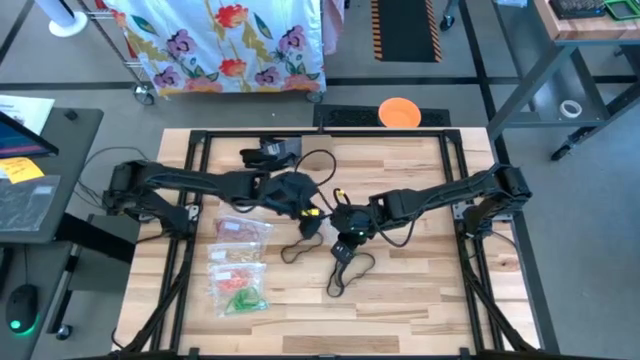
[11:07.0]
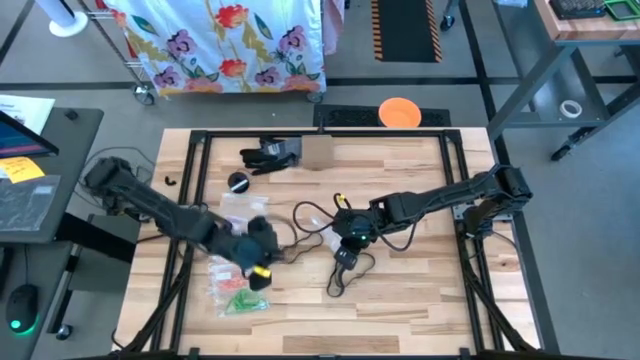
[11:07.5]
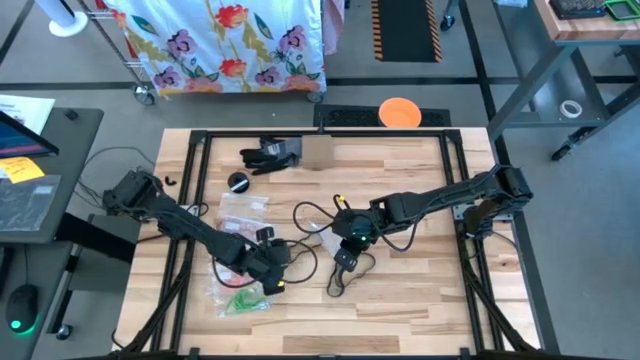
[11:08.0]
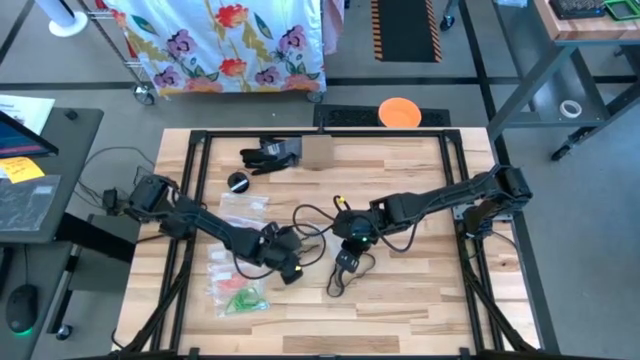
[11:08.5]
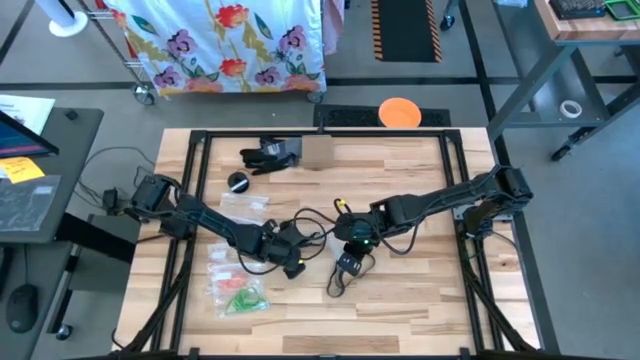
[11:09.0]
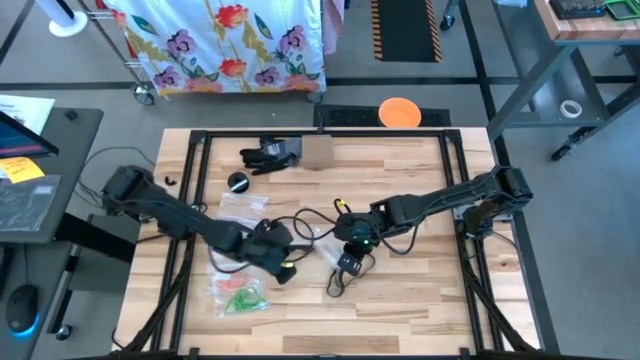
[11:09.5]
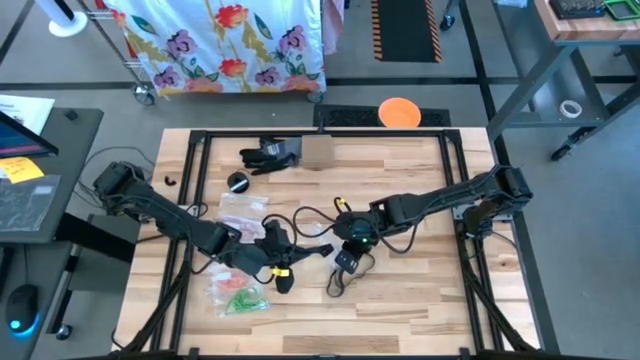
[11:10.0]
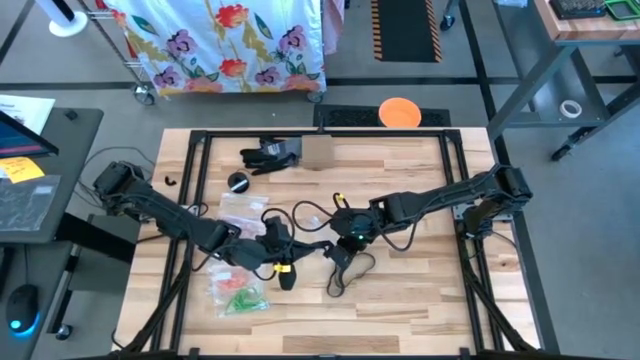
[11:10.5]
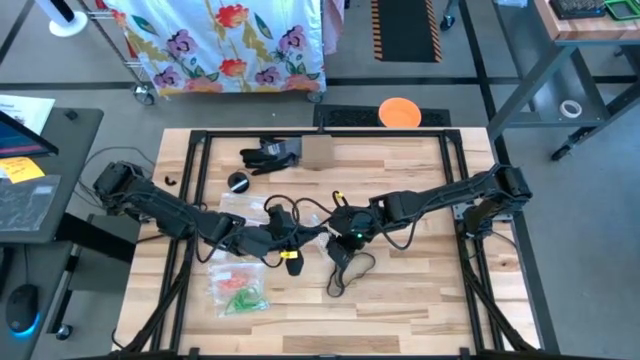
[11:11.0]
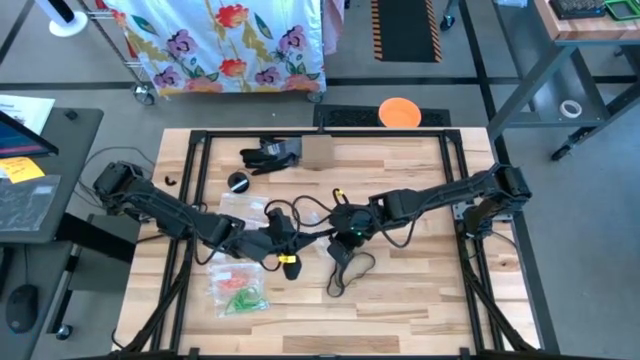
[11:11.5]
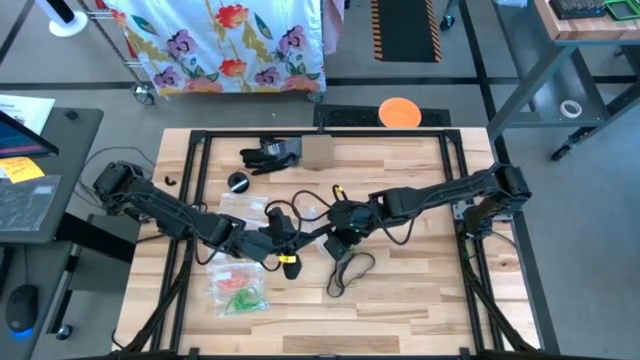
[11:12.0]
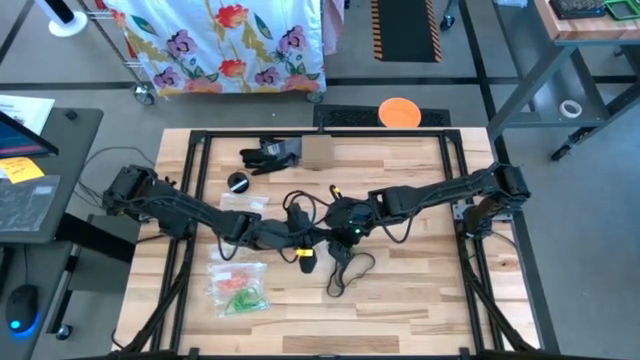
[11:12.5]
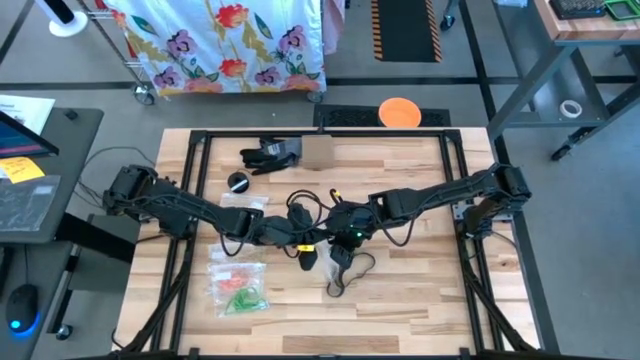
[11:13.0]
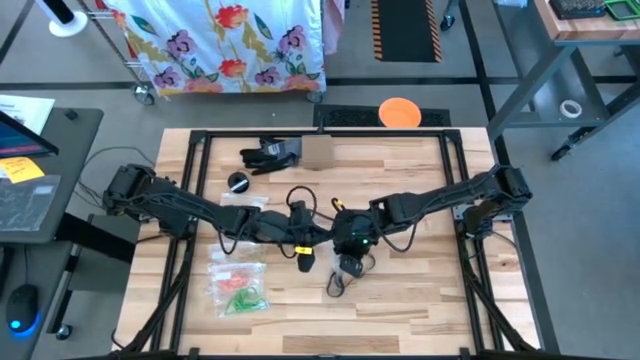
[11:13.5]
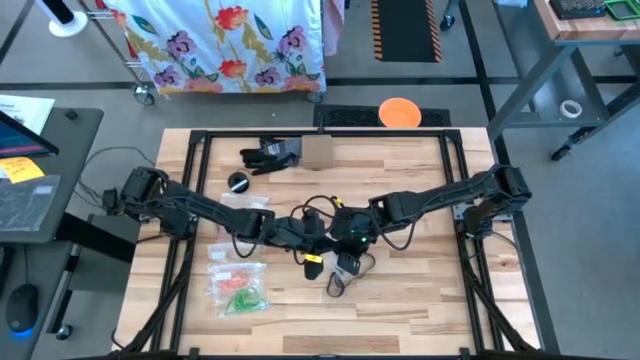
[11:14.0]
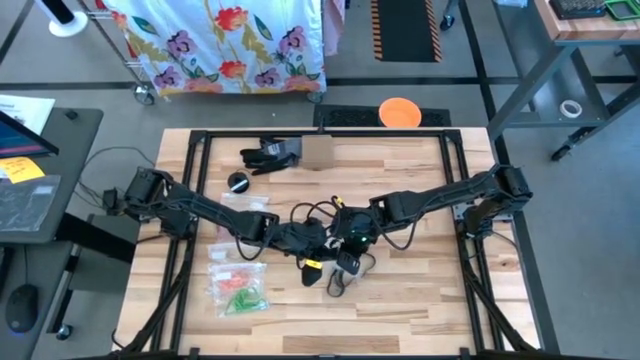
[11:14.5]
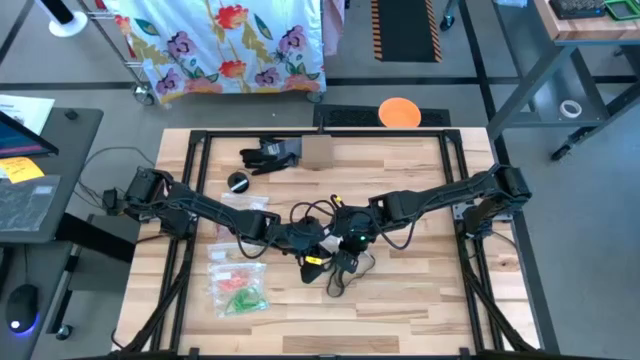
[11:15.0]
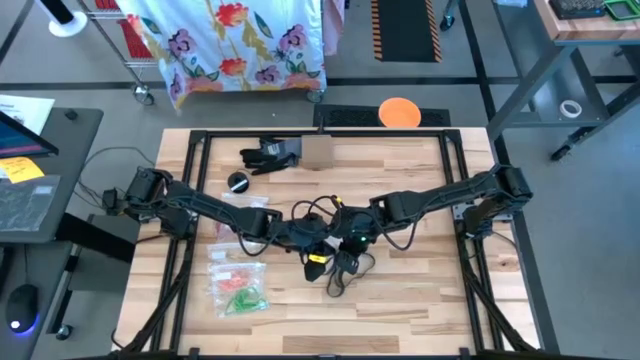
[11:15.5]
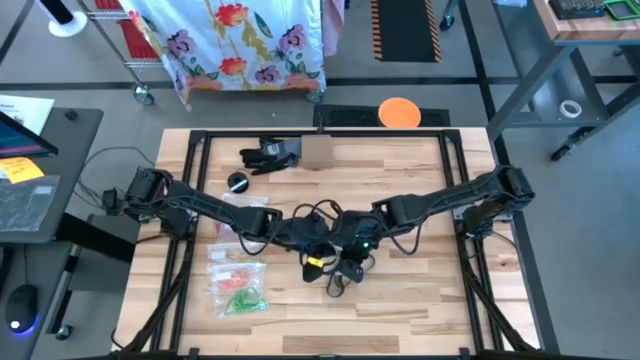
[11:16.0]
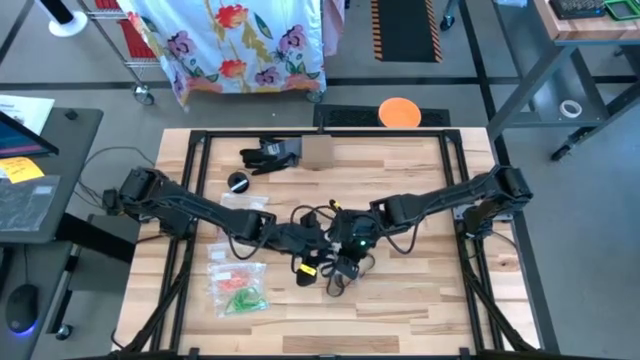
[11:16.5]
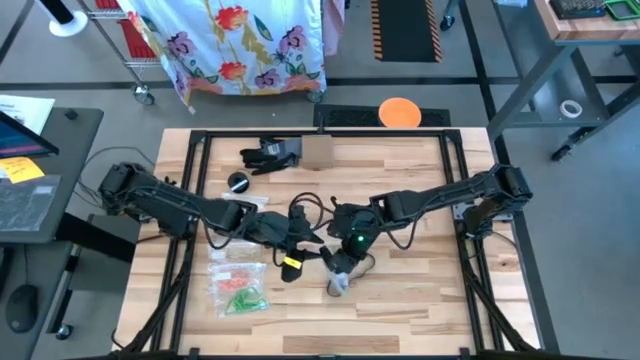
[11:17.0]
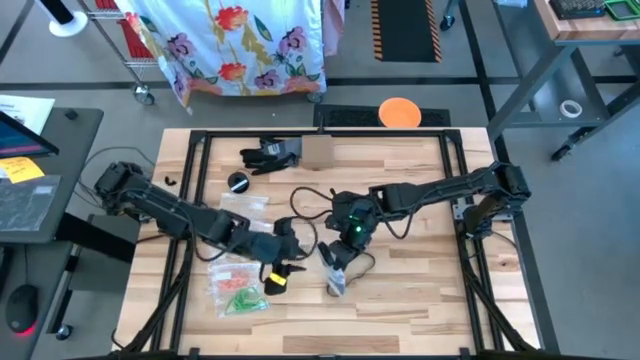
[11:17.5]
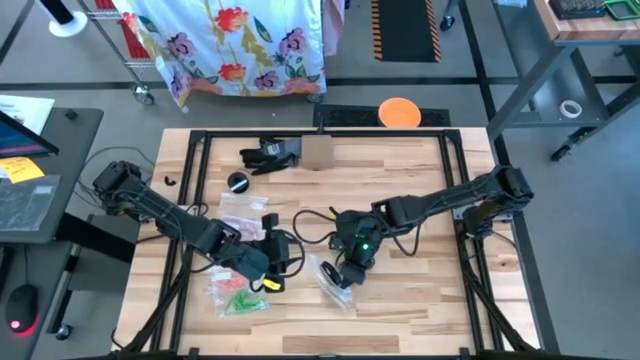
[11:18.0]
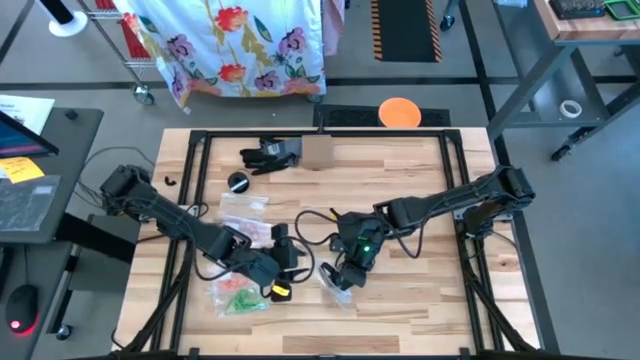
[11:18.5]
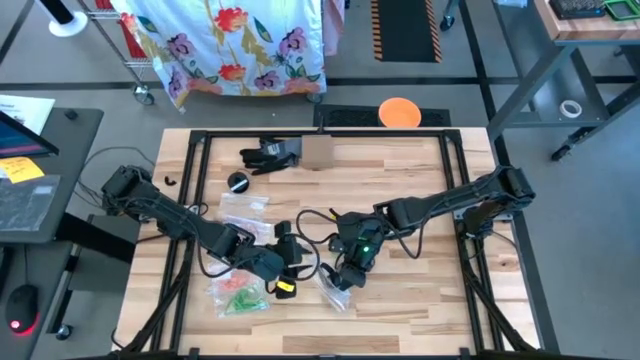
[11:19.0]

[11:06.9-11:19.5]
Task: Sort rubber bands
Put the black rubber band into the transparent zip bag

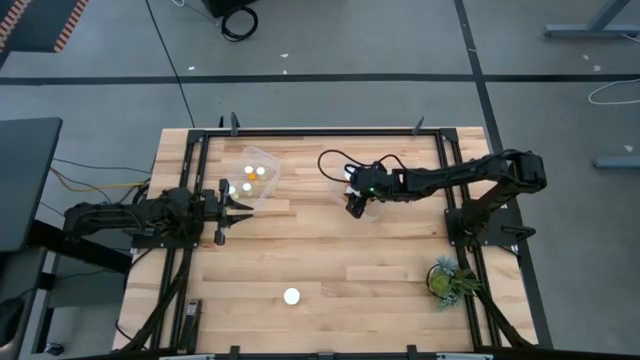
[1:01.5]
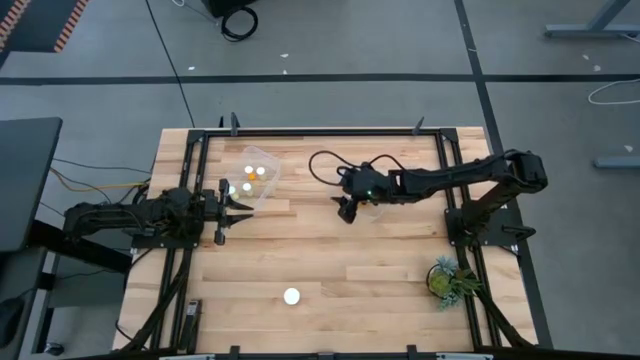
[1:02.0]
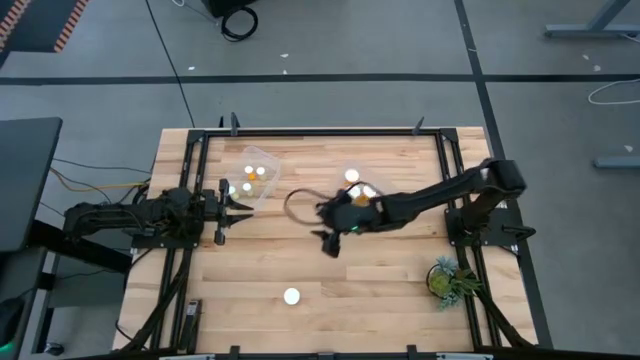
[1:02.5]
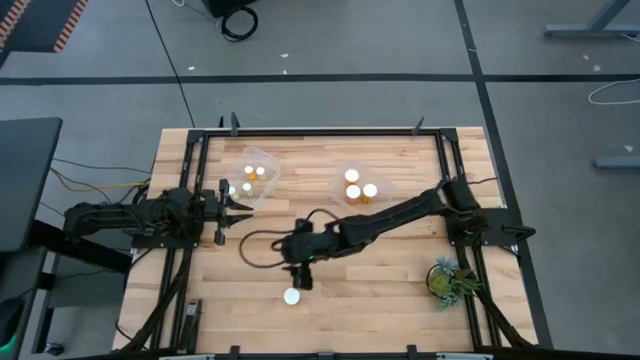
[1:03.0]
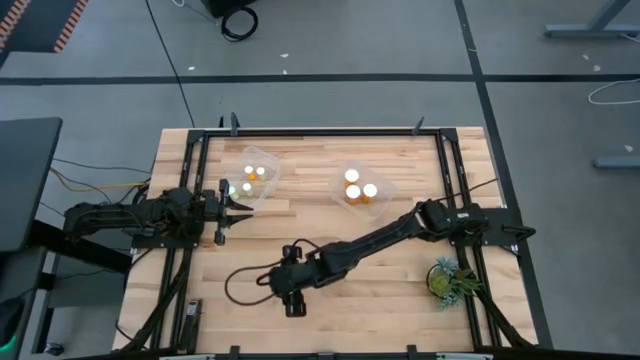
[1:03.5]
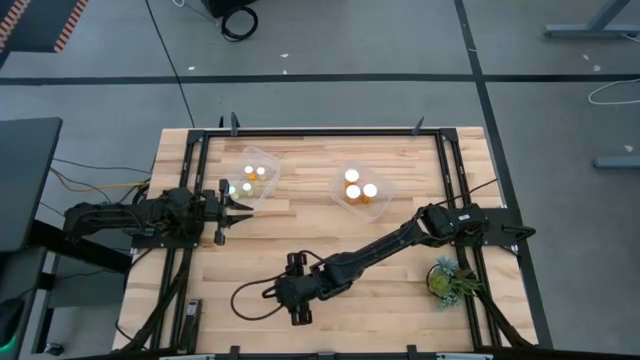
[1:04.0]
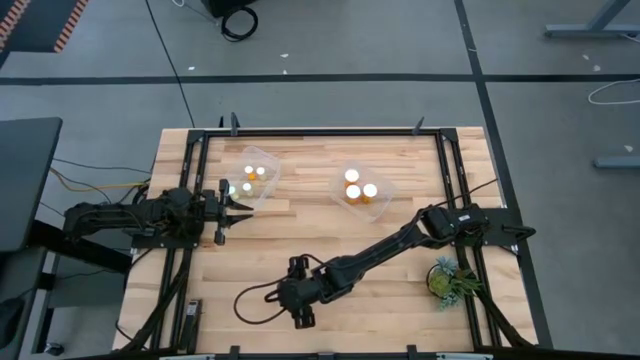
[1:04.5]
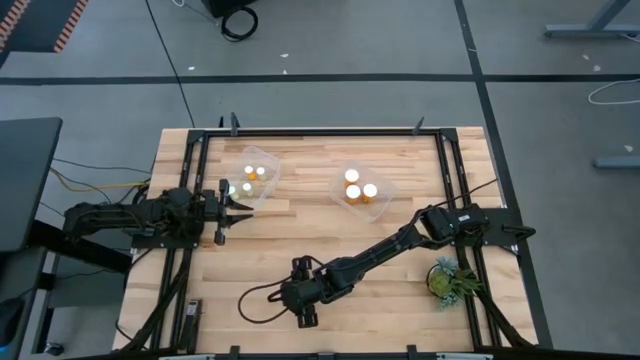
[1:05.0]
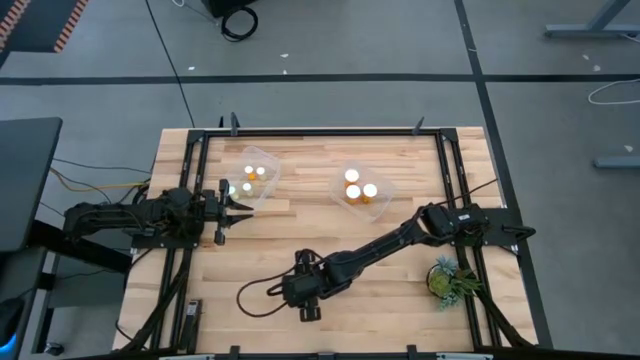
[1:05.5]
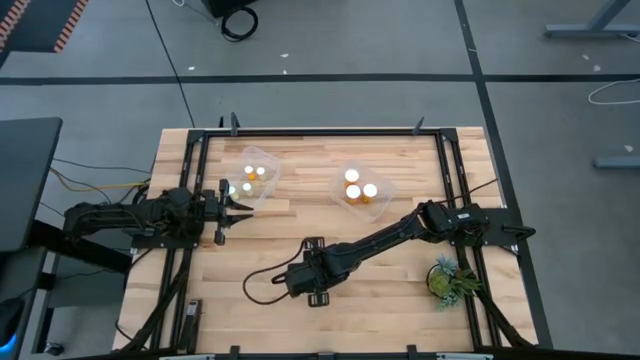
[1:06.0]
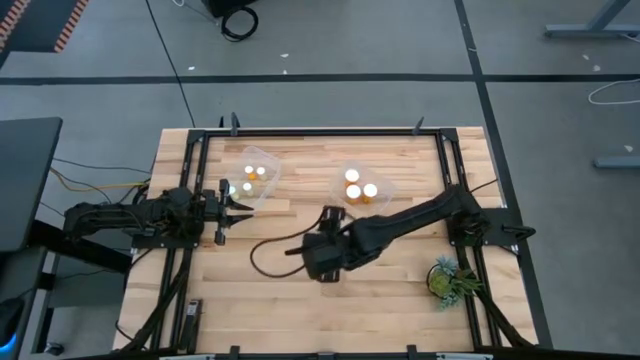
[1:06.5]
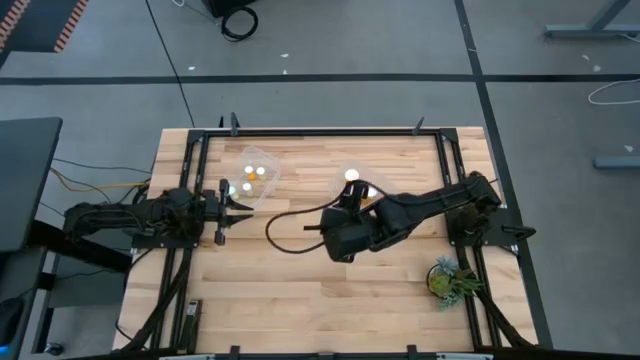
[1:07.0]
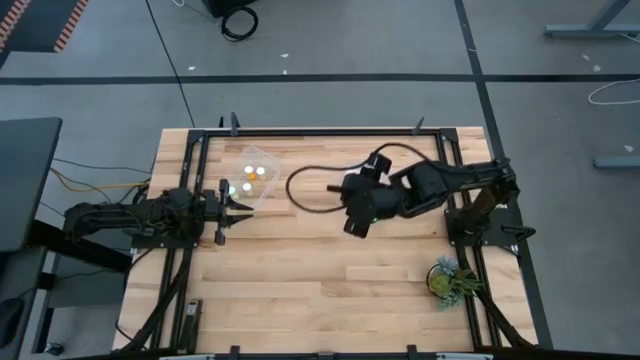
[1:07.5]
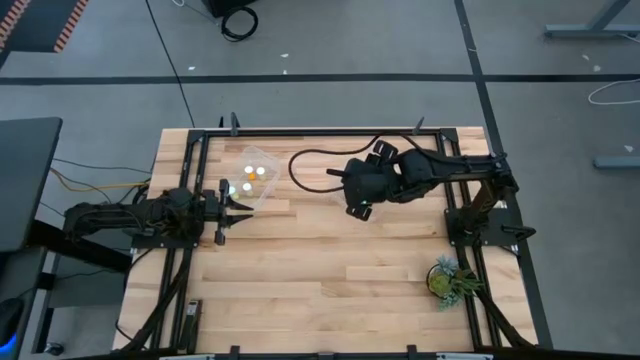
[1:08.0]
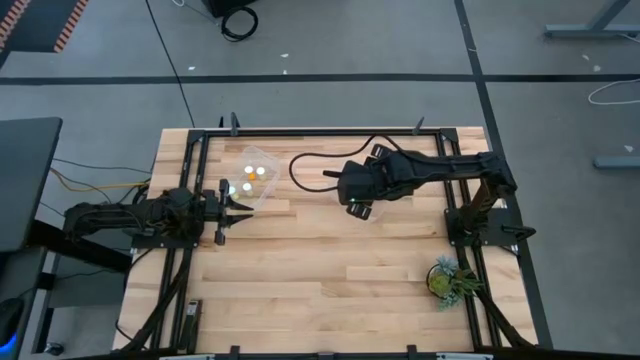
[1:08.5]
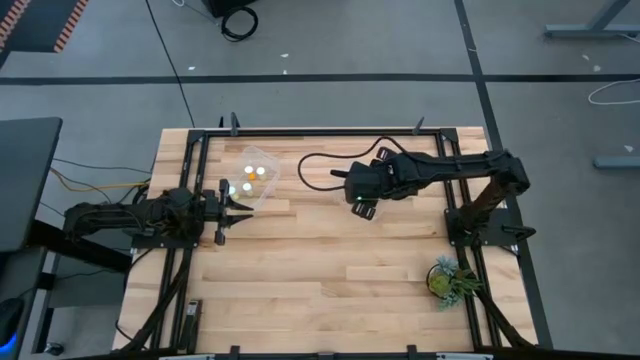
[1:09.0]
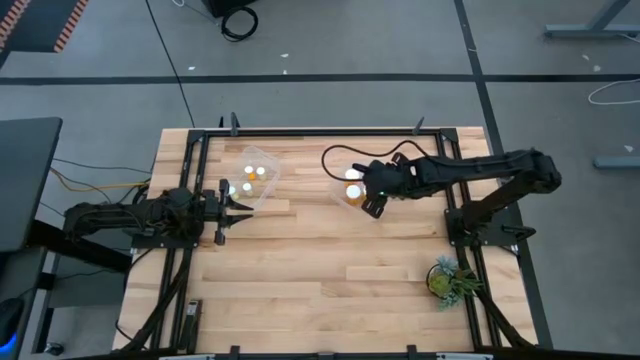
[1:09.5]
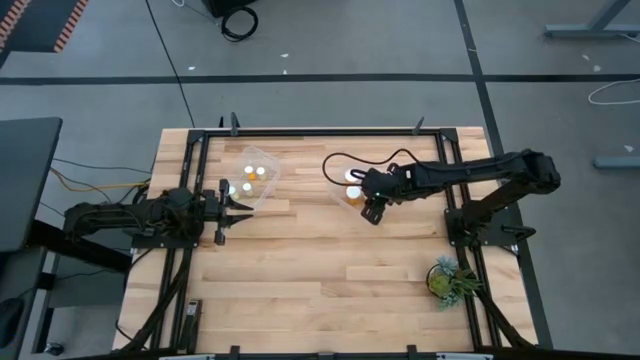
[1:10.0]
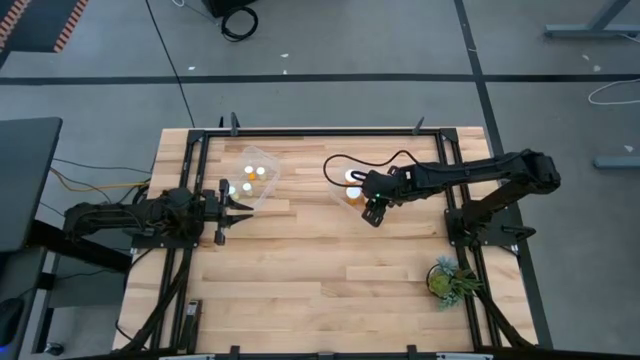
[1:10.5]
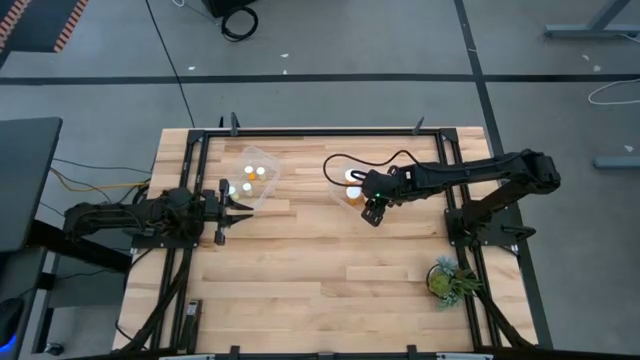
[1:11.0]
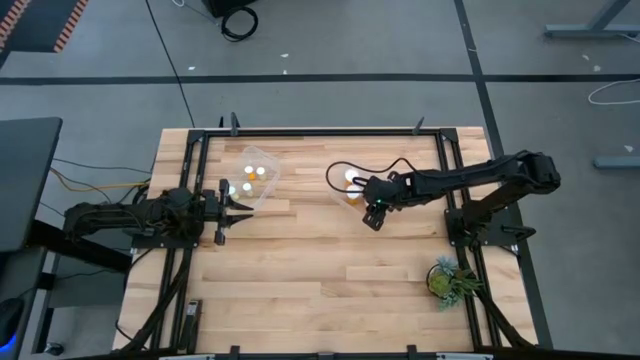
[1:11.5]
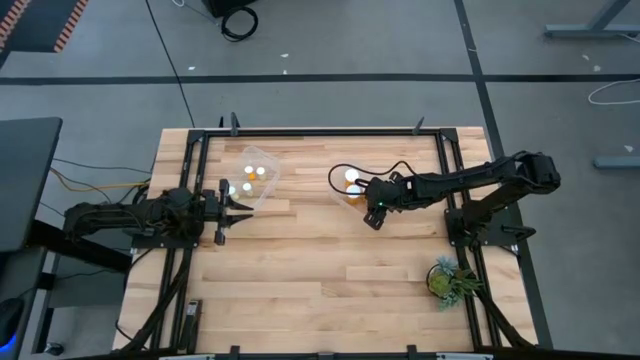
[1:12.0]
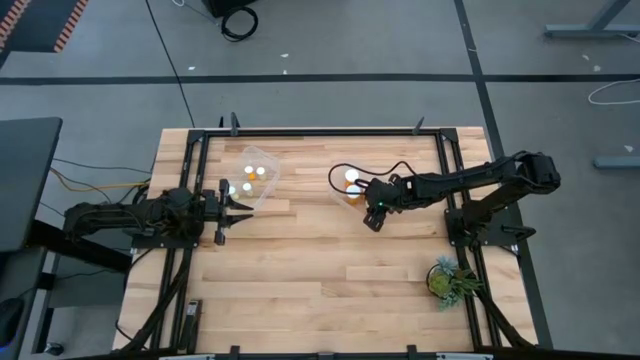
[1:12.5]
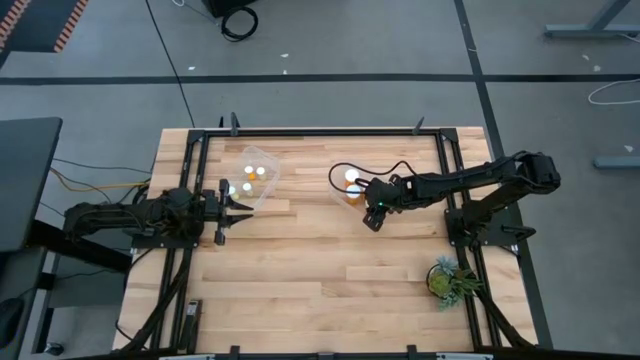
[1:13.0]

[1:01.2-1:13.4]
Task: Pick and place medicine bottles into bin by pill shape (circle, oval)
Put the big orange pill bottle into the right transparent bin
